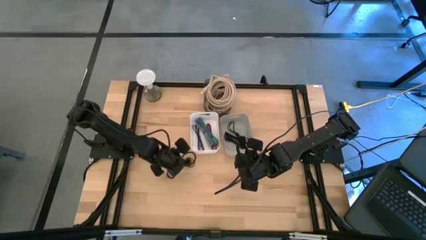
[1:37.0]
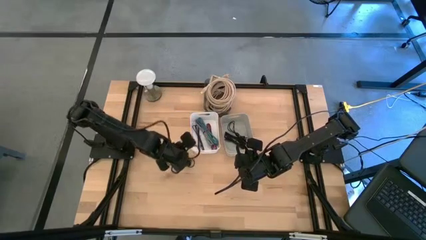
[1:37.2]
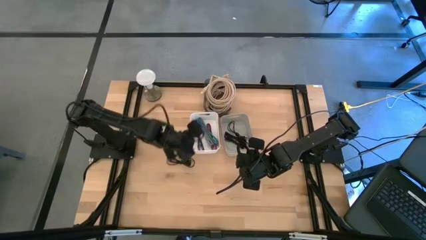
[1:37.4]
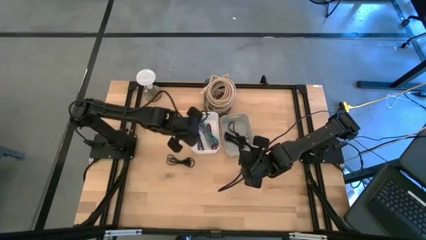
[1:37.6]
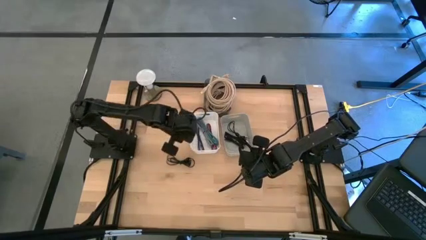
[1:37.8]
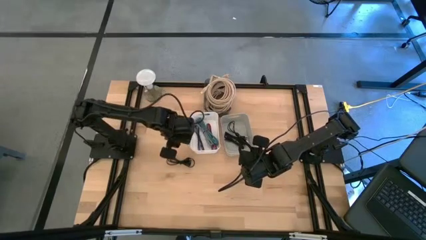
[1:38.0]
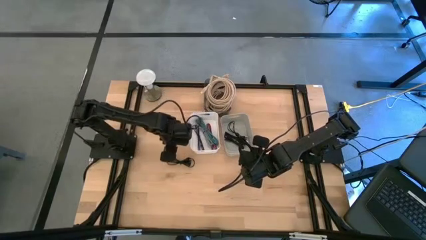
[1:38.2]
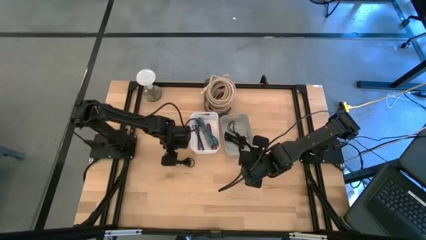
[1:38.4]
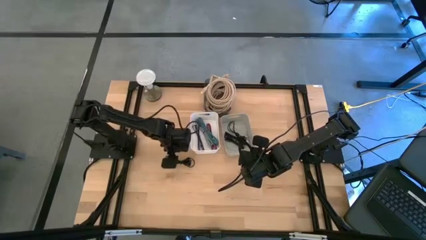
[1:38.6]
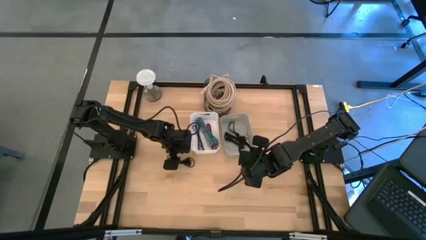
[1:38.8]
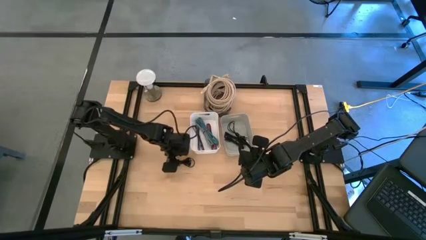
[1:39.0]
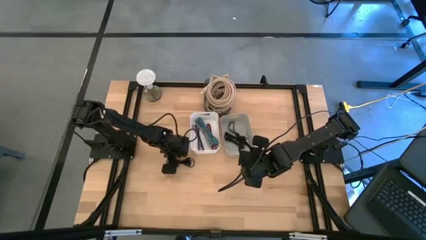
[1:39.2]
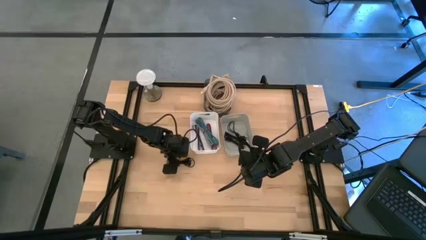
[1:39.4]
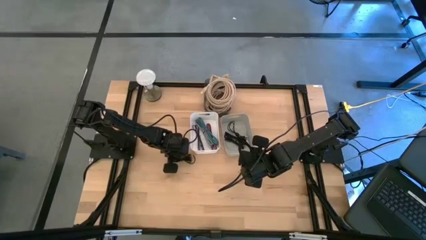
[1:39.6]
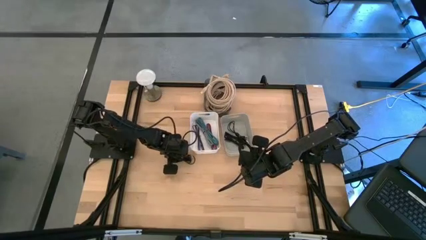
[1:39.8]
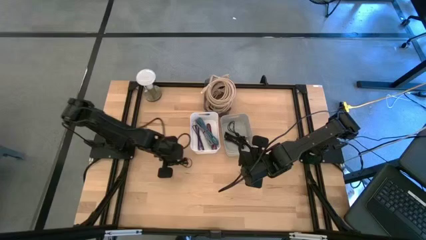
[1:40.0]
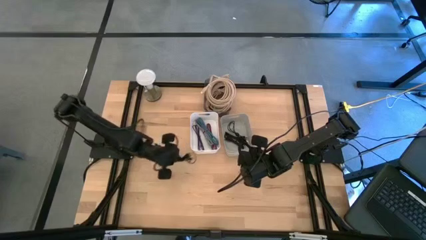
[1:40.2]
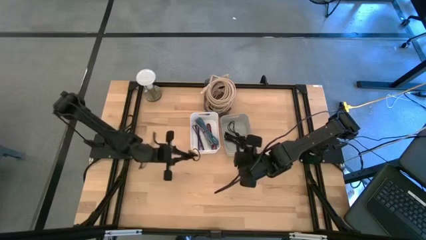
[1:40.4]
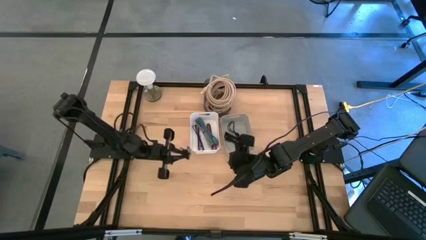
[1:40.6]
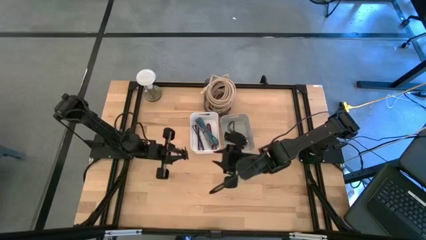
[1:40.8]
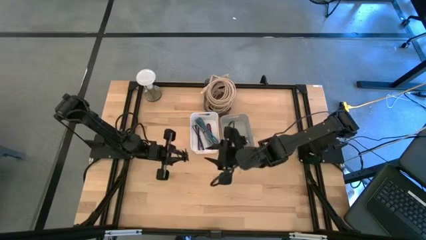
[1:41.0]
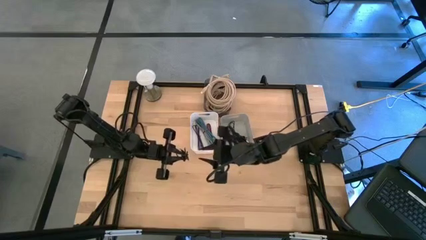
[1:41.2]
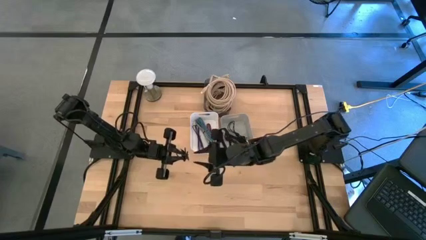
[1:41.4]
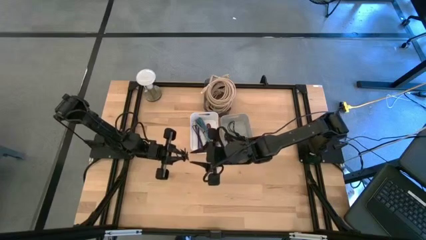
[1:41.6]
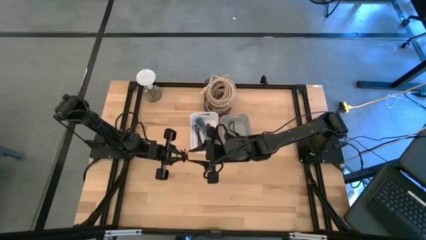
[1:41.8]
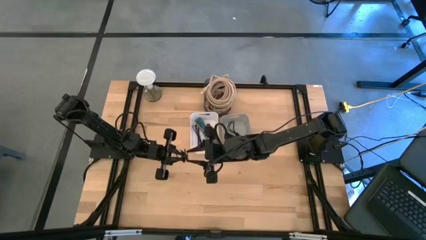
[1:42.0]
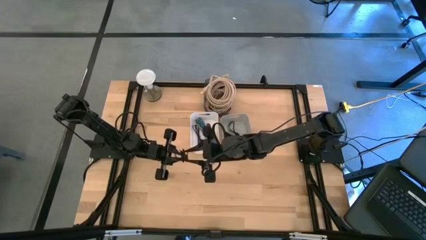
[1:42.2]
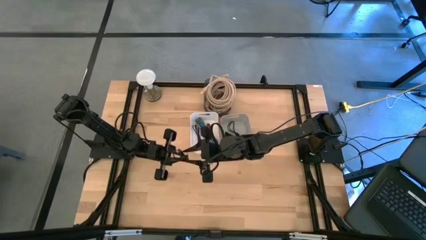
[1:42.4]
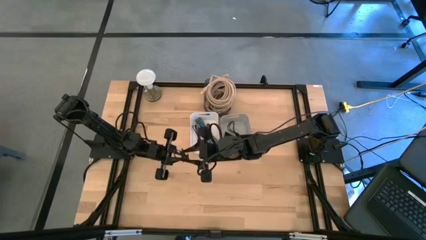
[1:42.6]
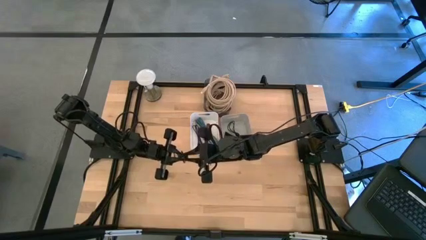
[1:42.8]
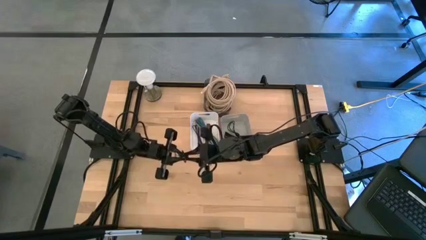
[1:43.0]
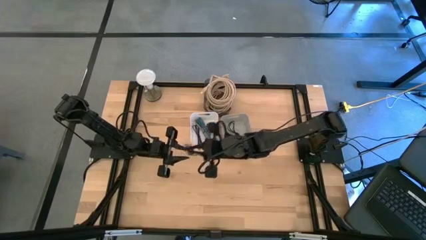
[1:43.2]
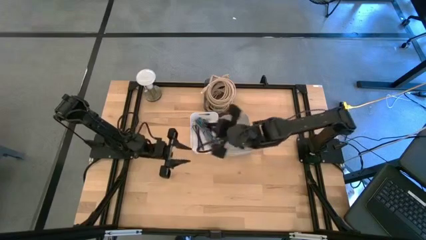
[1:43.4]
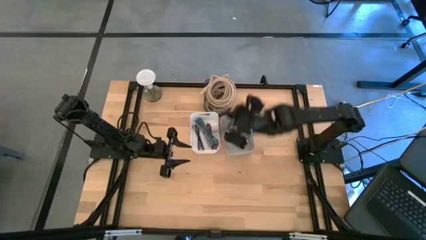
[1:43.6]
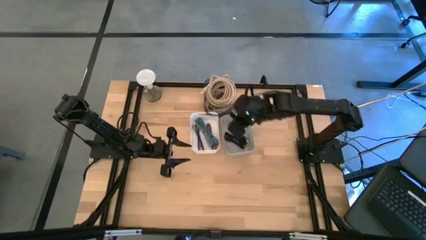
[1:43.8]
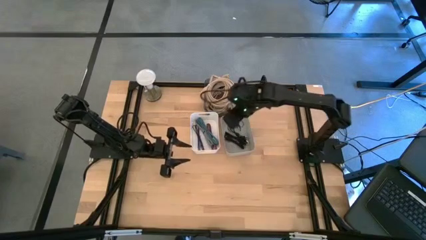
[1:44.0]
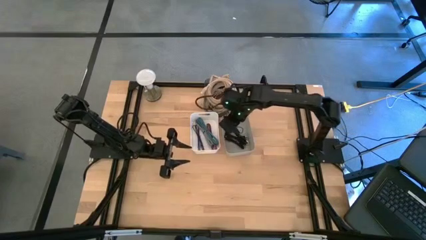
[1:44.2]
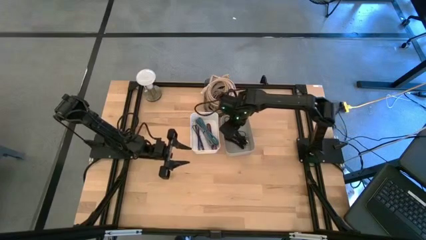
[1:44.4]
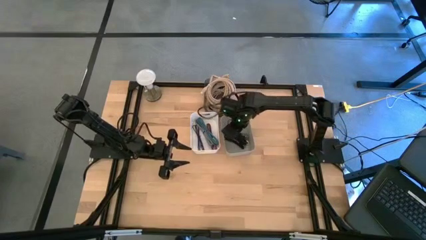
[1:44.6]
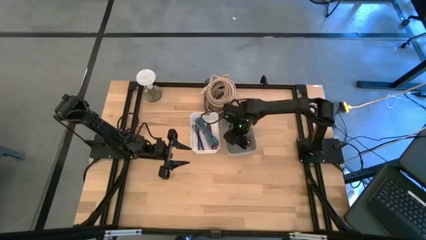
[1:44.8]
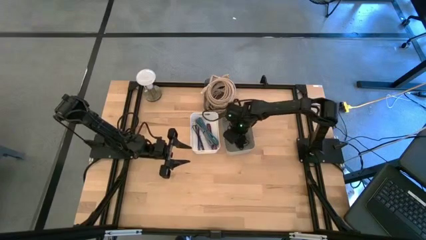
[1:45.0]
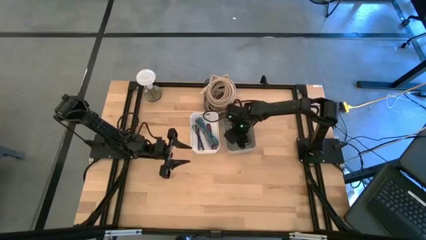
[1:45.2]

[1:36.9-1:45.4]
Task: Pick & Place USB Port
Put the black charger cable into the gray bin

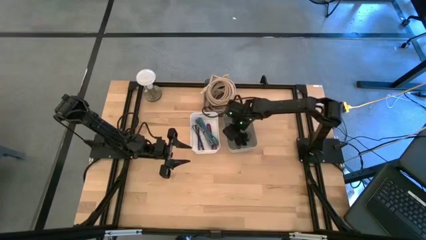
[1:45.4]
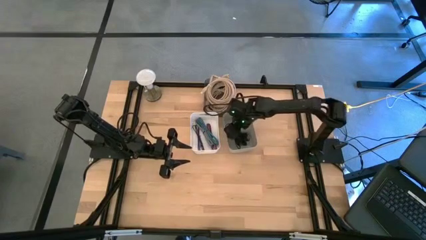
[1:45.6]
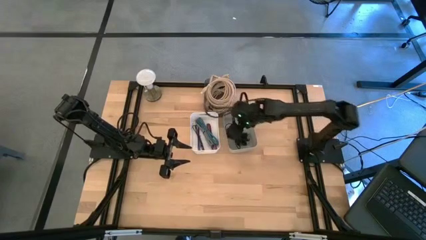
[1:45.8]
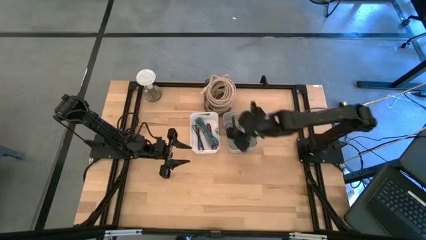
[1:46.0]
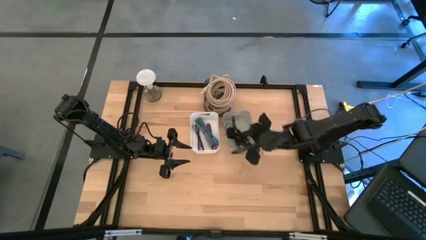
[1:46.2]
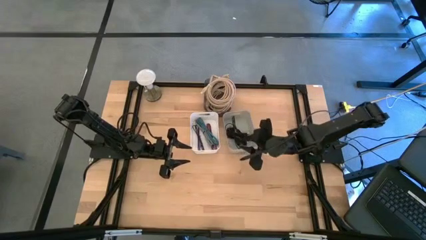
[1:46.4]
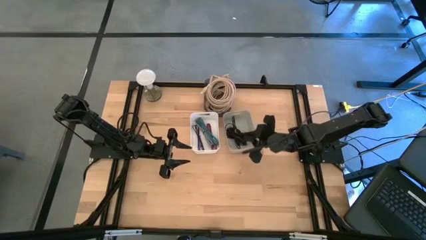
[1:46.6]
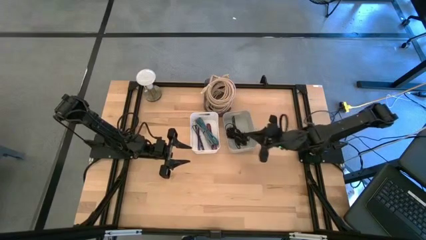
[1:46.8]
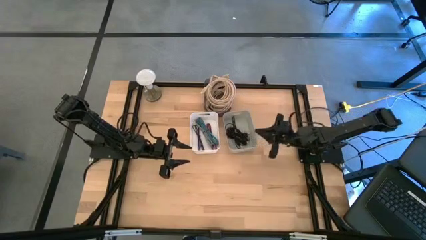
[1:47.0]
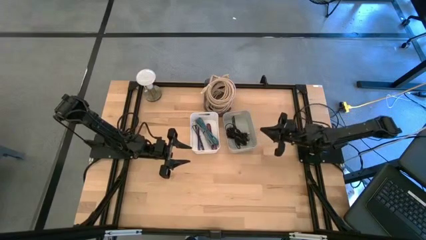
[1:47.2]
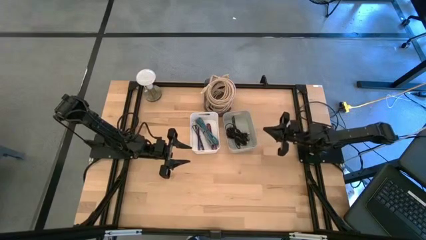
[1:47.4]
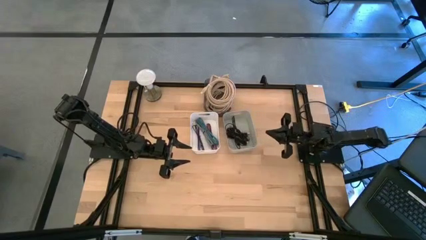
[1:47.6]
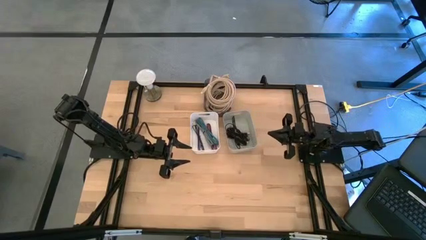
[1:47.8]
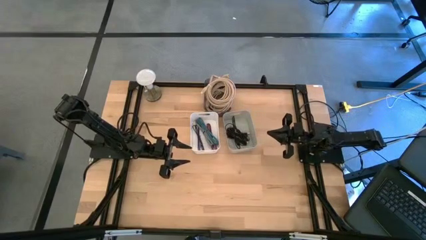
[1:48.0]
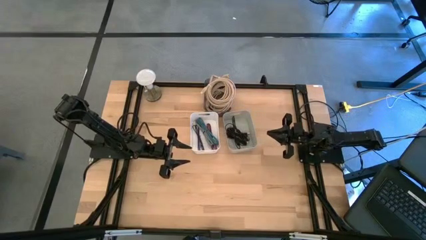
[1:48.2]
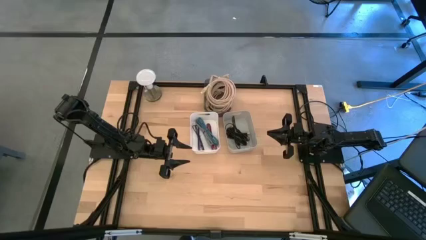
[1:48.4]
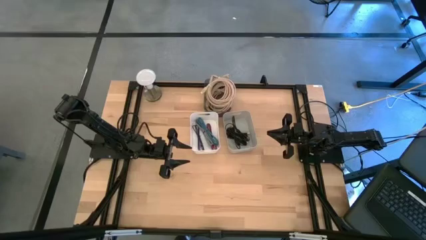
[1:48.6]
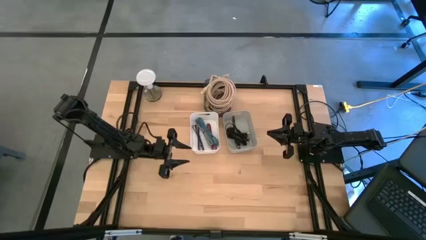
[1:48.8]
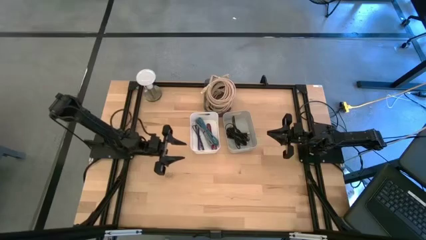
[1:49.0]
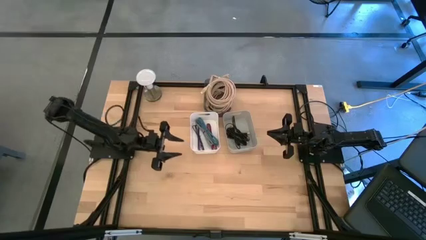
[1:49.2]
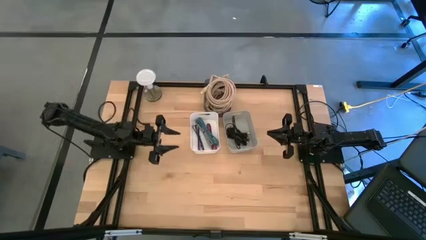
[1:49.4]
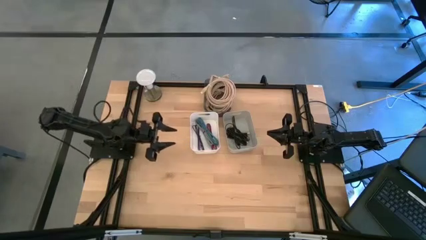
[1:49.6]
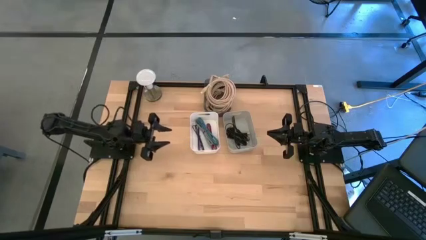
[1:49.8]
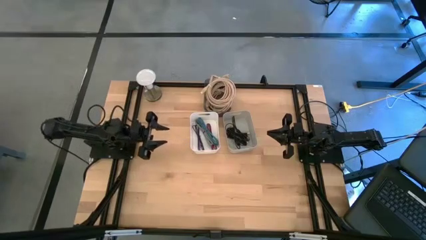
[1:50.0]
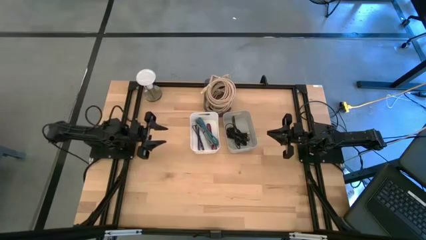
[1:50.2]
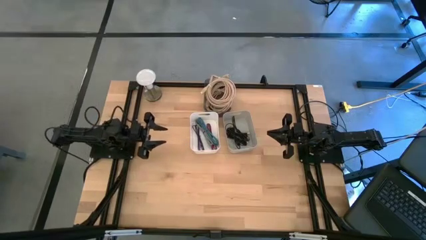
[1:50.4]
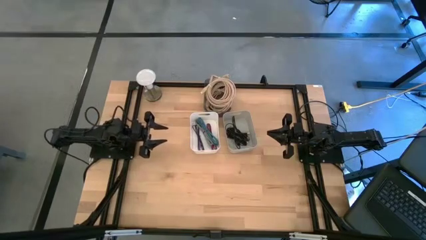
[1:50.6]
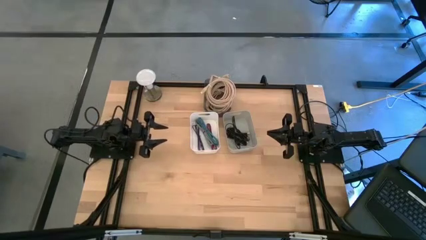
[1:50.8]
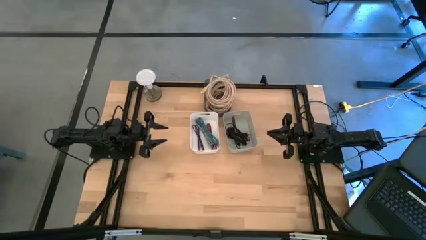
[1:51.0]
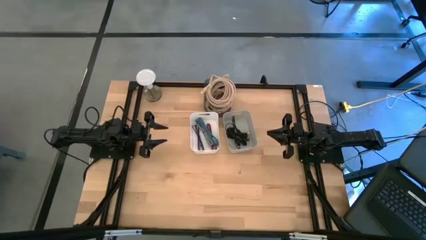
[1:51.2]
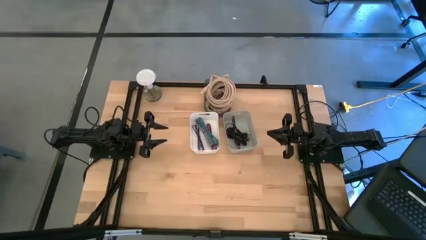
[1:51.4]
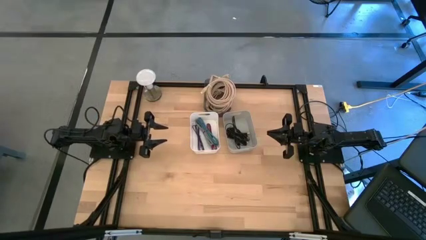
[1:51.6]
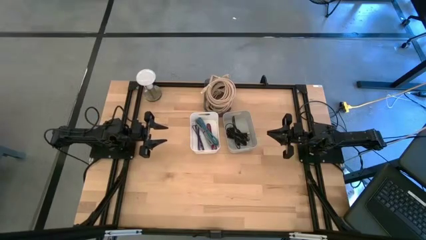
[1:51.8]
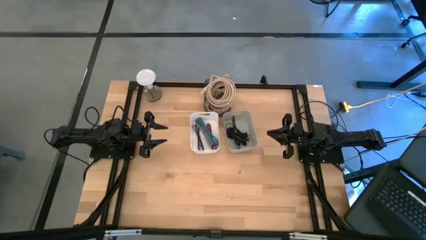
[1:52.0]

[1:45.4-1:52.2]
Return to Home Position

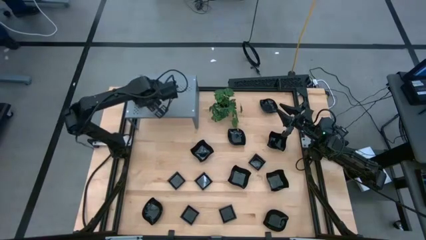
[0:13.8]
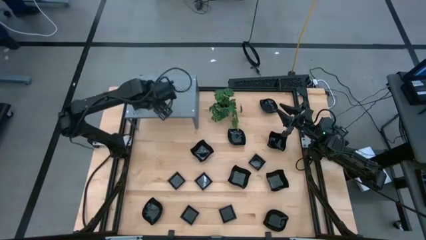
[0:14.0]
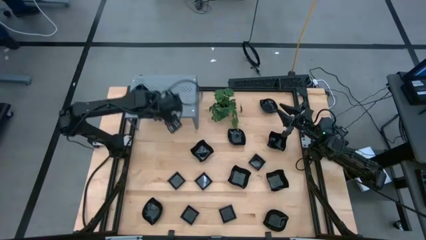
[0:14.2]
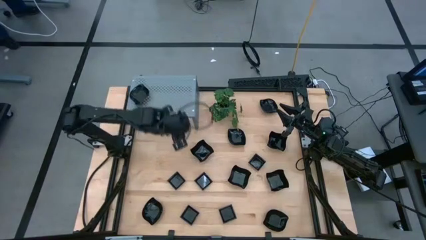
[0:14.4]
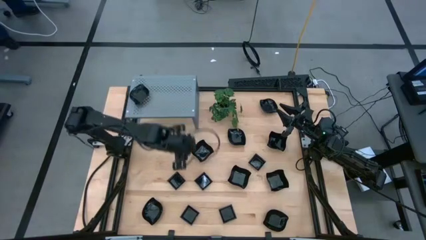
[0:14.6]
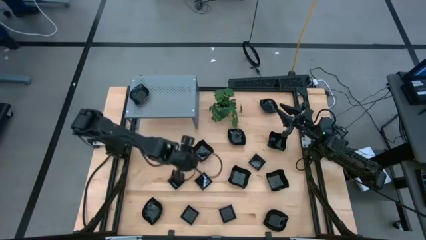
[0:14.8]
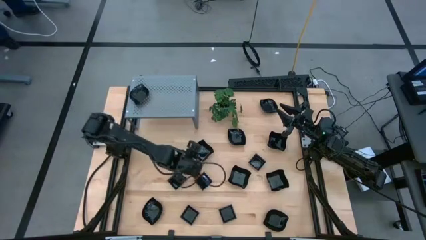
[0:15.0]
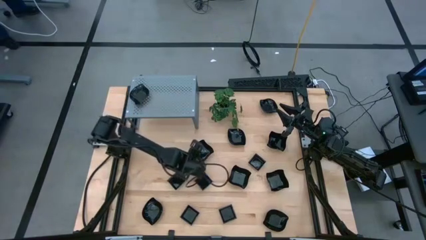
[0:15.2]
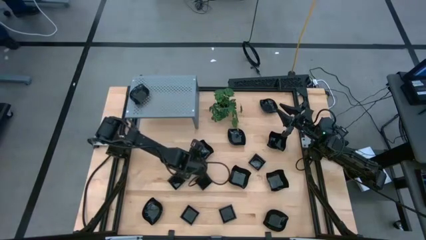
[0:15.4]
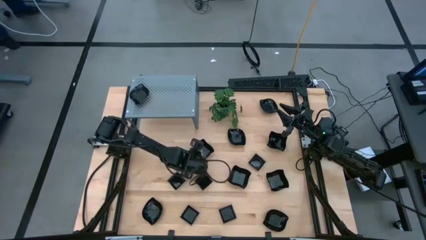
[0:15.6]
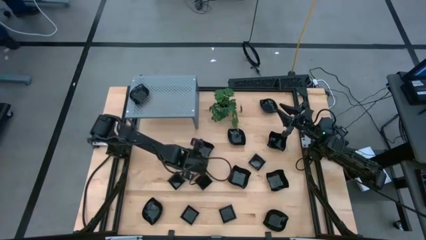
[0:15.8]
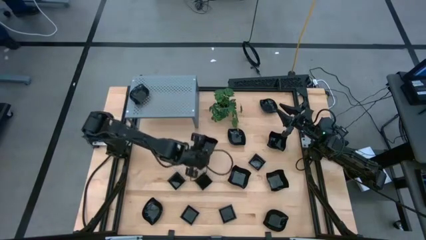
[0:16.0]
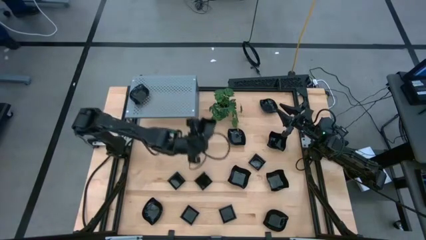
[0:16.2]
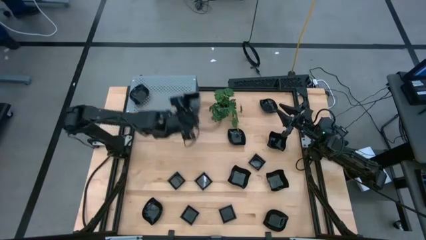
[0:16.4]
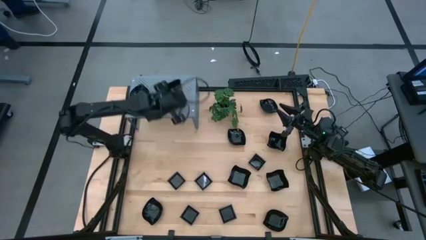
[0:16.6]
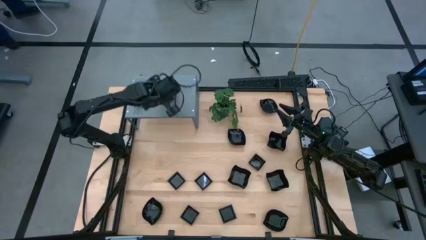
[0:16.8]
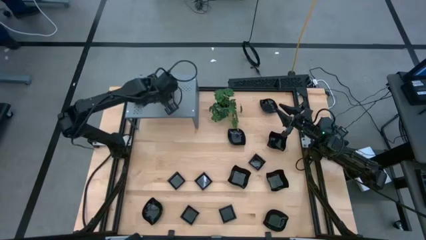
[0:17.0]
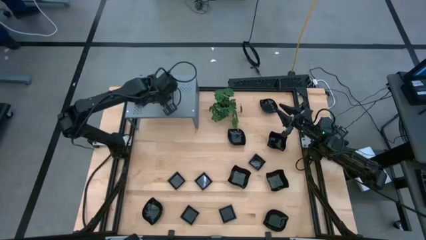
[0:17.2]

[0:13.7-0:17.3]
Task: Pick & Place Mini shaped plates
Put the black distorted square plate on the shelf
